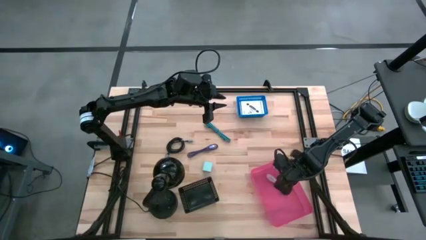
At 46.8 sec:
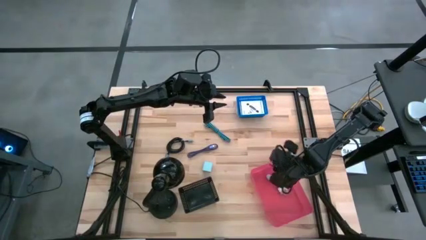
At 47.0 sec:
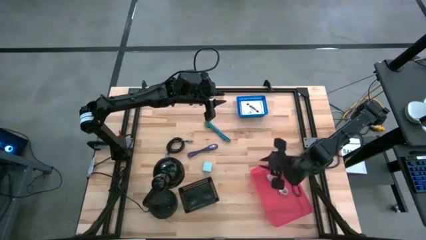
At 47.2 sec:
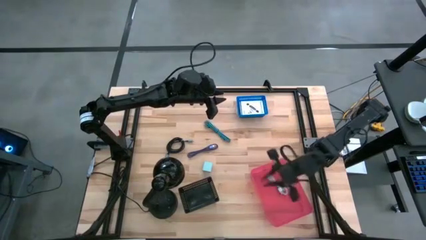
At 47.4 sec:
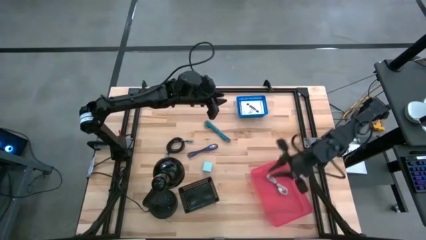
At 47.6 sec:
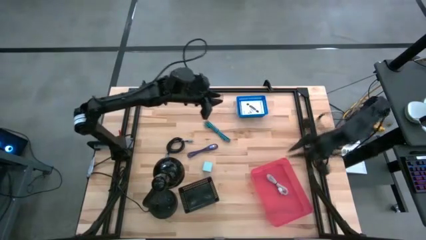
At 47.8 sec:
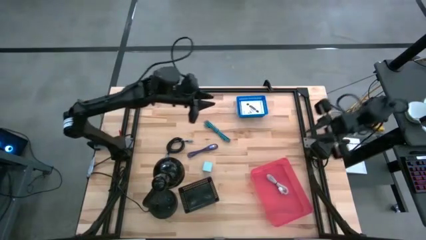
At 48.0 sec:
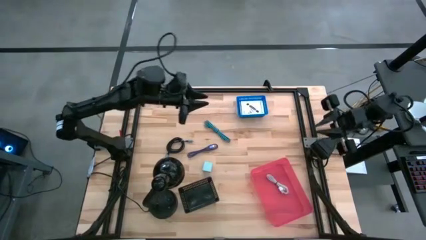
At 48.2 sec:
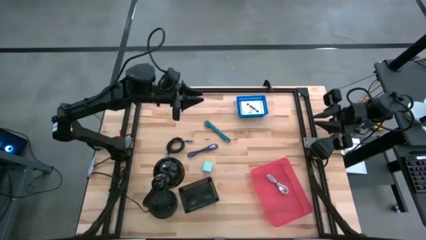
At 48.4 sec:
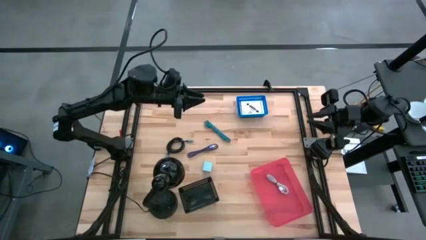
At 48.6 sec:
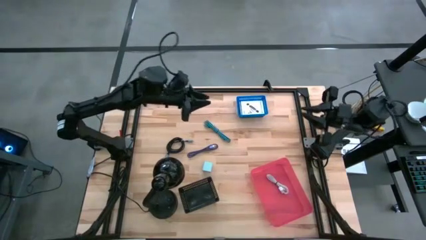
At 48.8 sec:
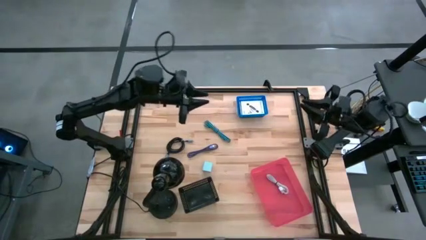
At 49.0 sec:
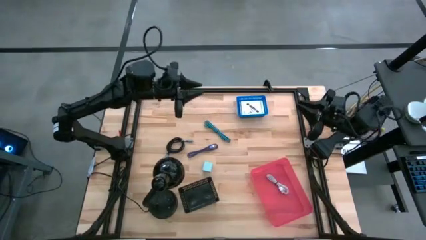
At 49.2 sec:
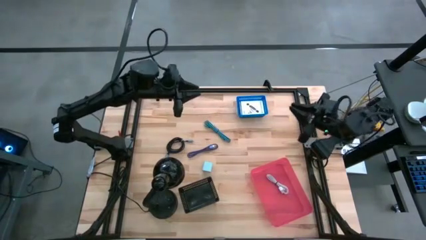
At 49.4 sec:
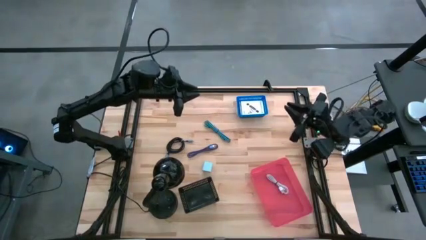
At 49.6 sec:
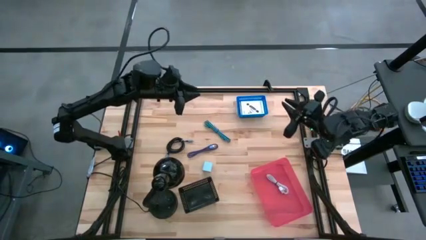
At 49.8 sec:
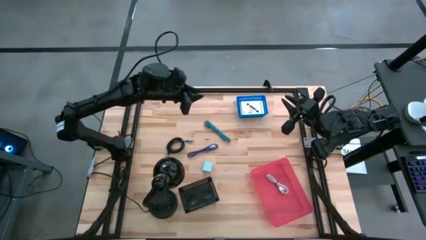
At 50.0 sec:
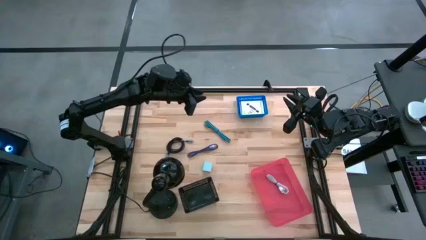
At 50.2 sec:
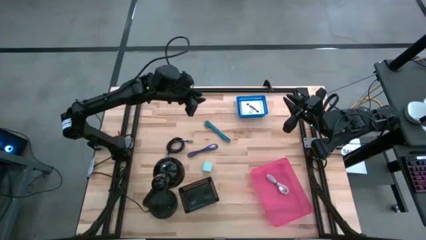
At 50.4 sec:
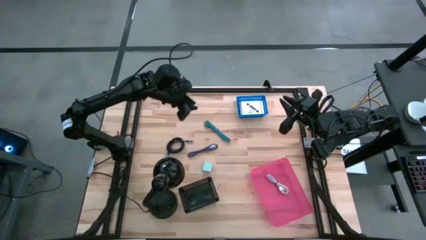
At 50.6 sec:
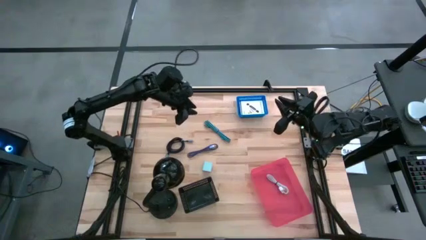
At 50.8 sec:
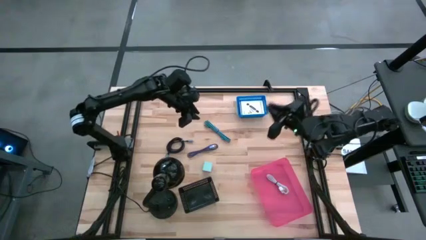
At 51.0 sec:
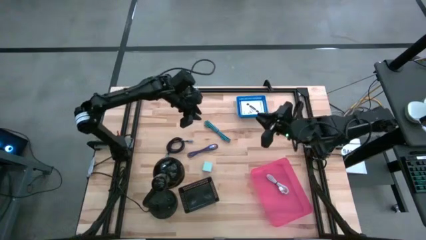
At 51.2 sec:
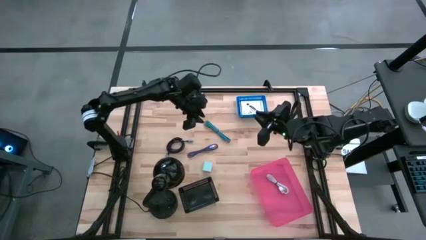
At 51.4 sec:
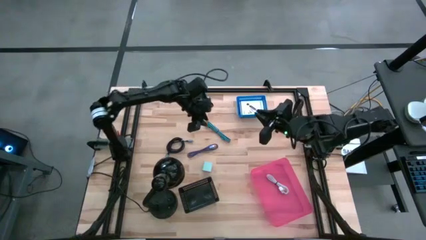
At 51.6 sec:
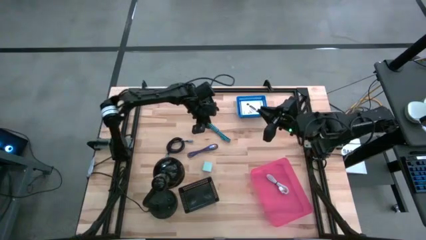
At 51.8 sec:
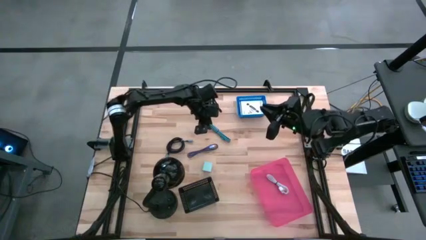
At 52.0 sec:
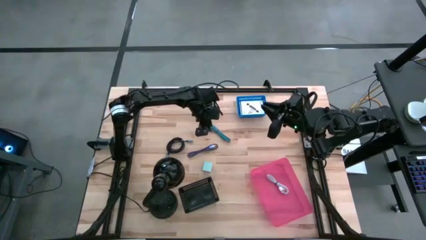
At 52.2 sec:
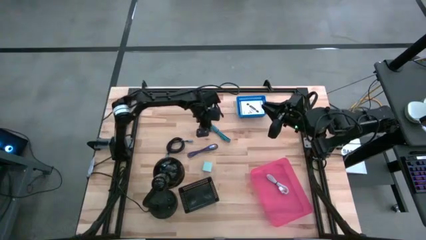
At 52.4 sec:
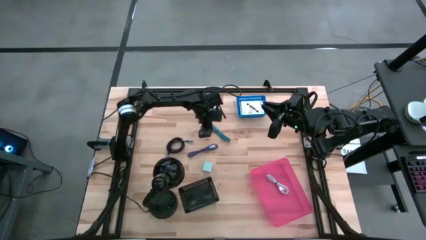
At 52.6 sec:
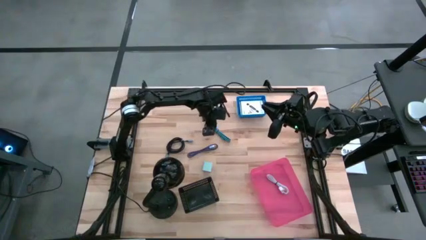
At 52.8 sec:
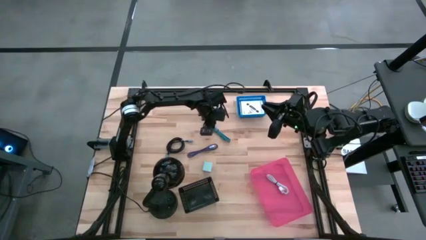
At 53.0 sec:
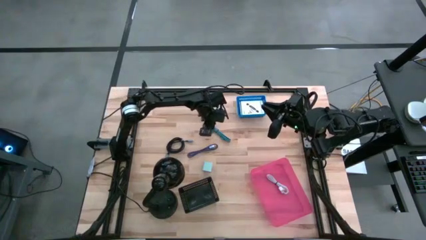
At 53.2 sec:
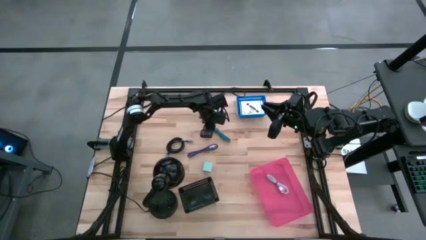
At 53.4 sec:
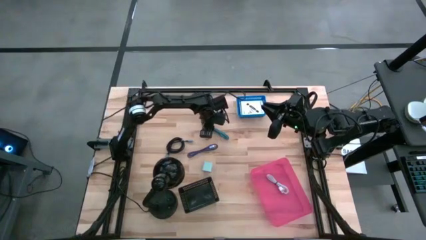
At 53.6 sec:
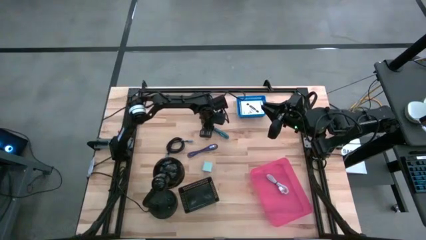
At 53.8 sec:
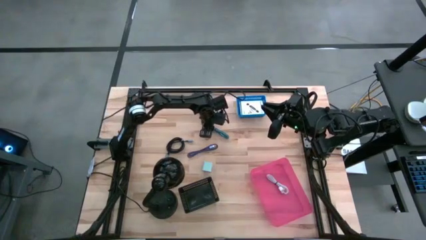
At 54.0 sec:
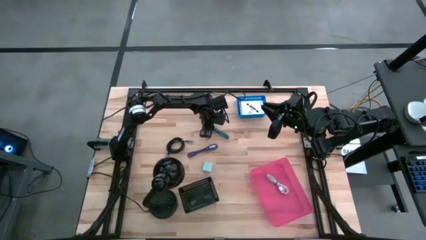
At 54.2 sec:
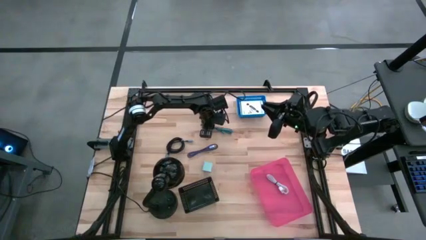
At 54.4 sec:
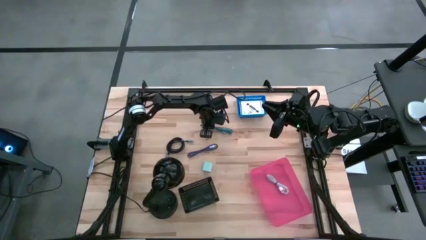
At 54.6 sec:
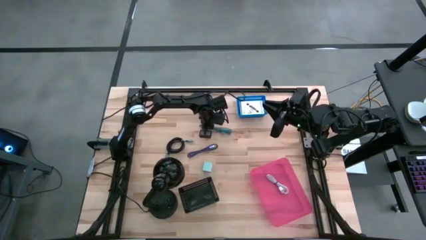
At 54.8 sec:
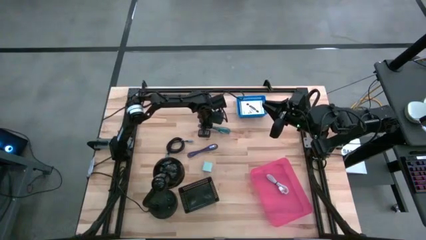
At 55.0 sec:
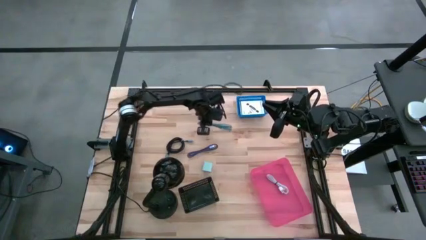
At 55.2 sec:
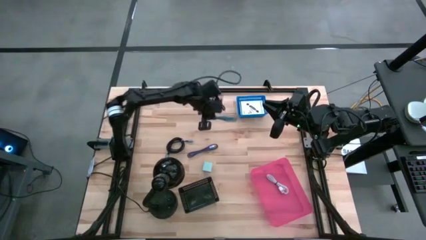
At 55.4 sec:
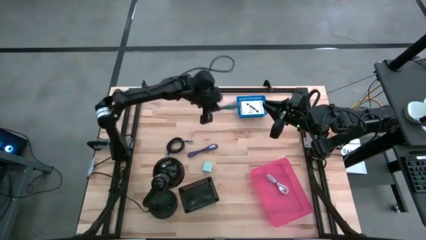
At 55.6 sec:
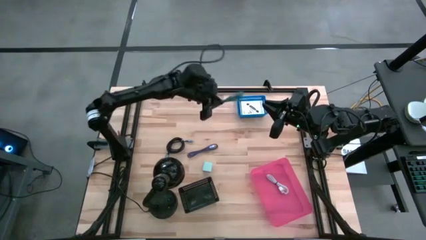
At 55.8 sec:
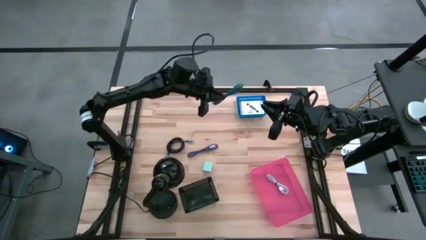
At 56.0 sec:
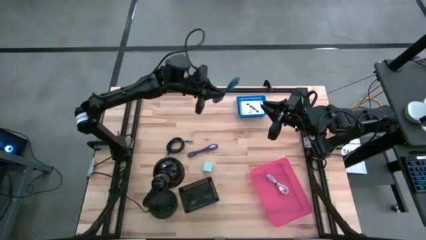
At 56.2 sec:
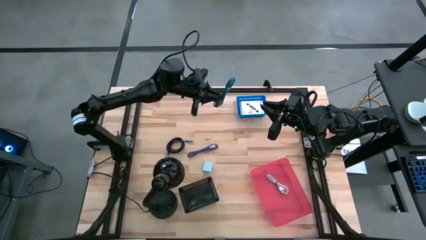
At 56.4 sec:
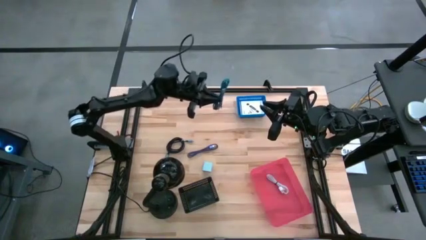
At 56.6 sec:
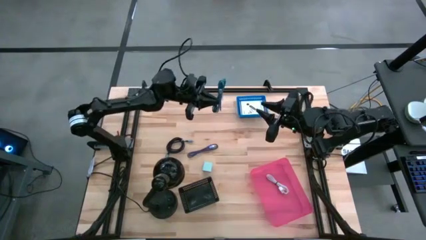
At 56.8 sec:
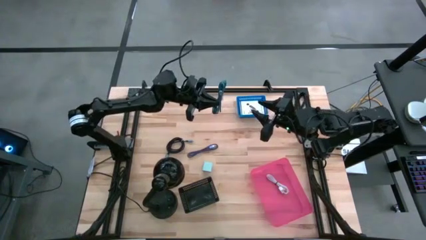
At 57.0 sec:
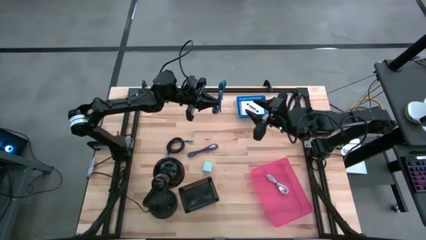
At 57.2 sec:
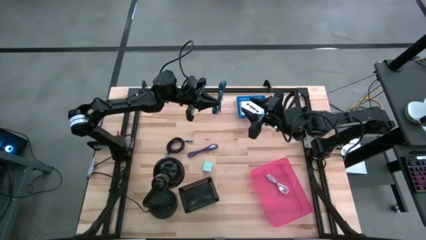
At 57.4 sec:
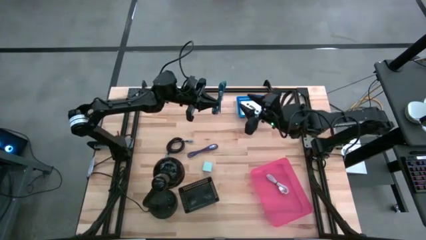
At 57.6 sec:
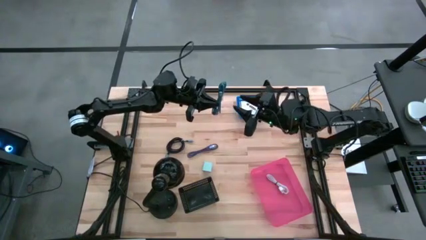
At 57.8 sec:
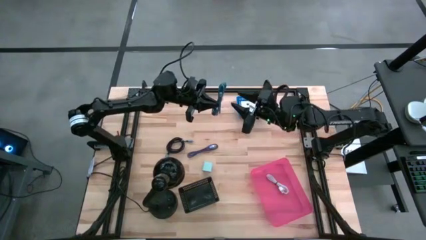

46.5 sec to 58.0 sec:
Task: Pick and place items into bin
Put the blue charger cable into the pink bin
